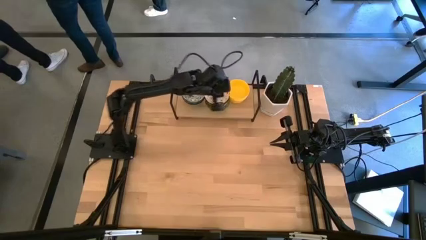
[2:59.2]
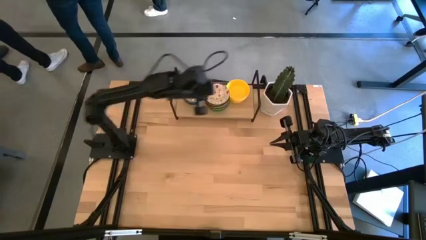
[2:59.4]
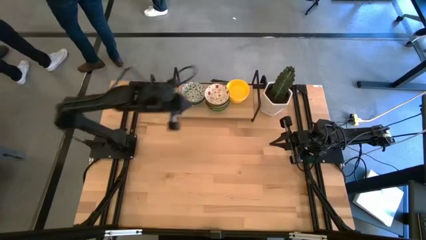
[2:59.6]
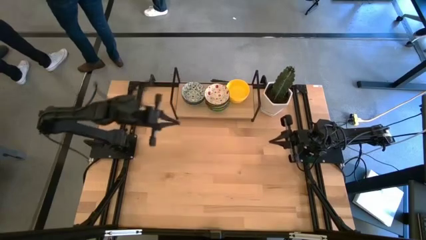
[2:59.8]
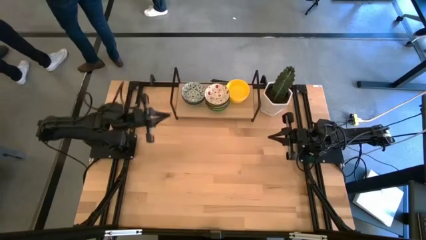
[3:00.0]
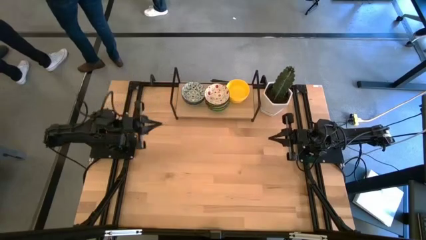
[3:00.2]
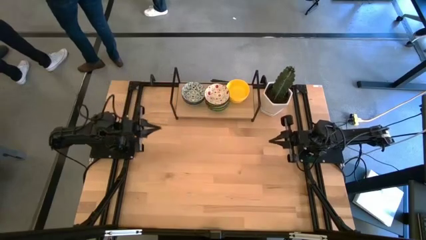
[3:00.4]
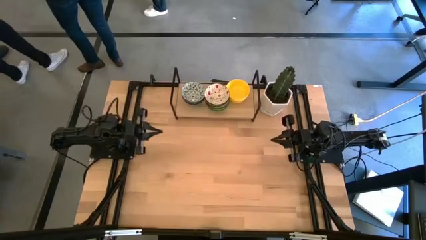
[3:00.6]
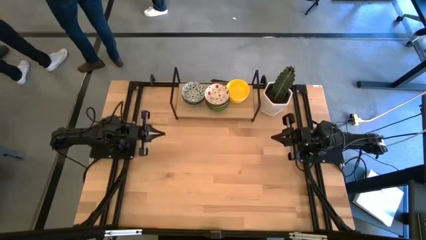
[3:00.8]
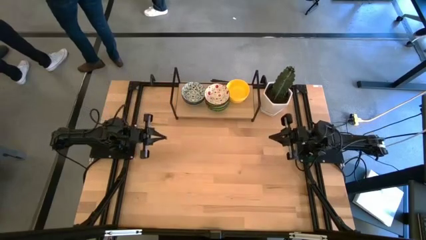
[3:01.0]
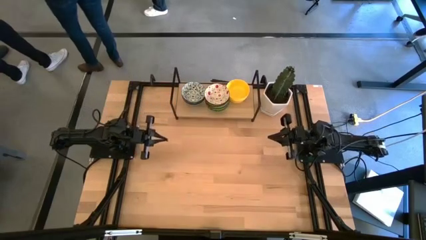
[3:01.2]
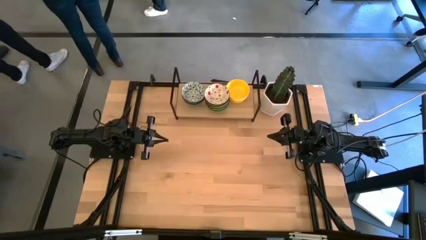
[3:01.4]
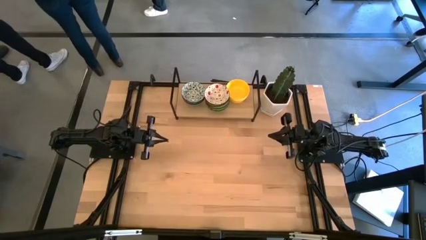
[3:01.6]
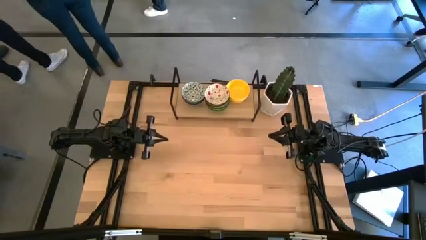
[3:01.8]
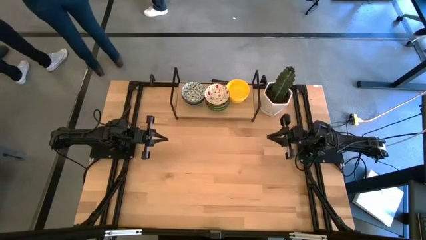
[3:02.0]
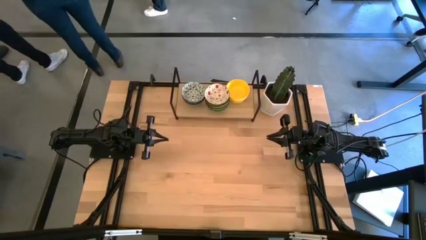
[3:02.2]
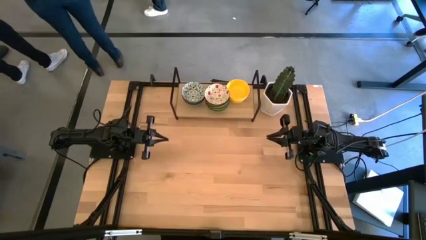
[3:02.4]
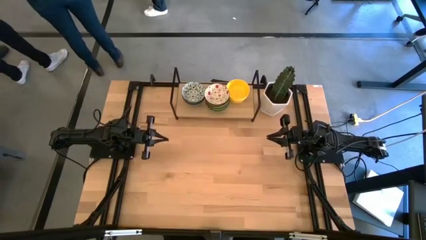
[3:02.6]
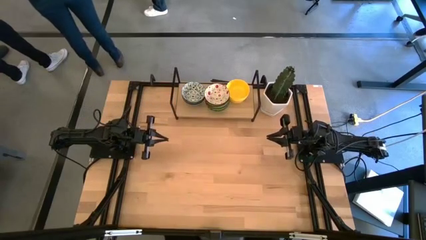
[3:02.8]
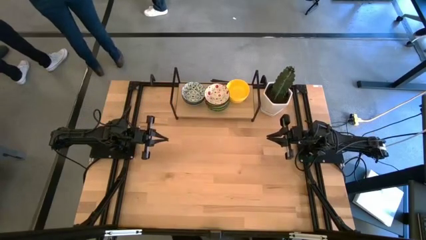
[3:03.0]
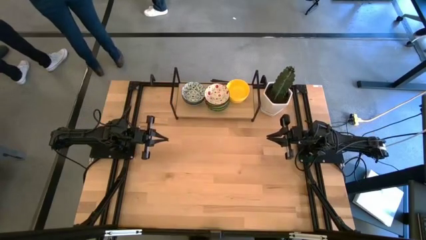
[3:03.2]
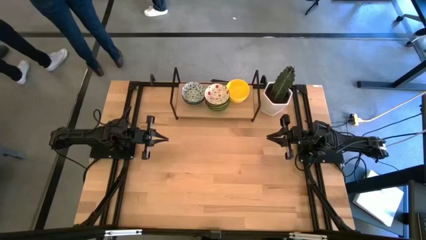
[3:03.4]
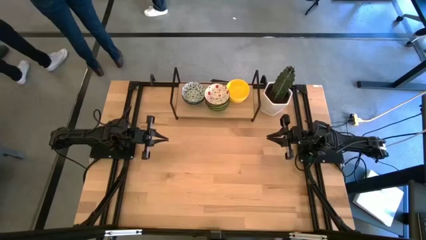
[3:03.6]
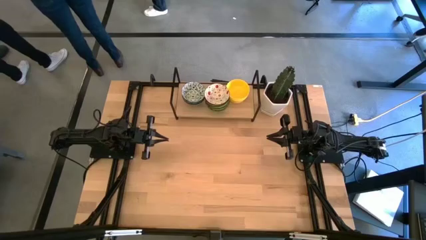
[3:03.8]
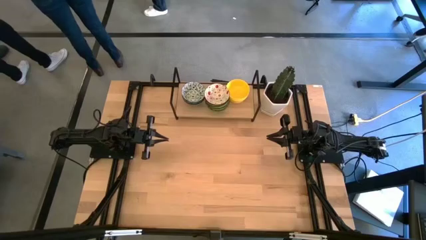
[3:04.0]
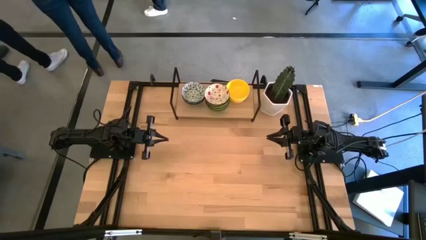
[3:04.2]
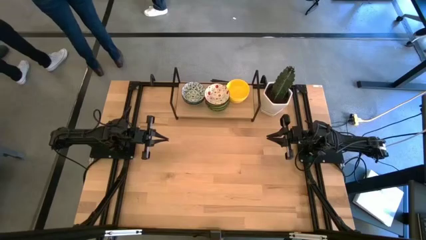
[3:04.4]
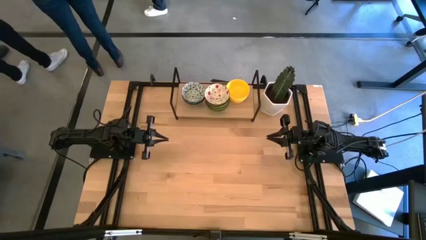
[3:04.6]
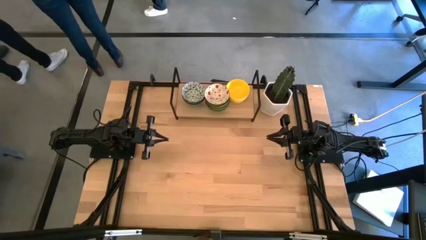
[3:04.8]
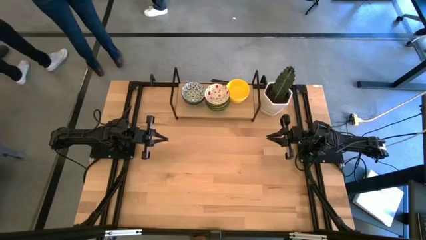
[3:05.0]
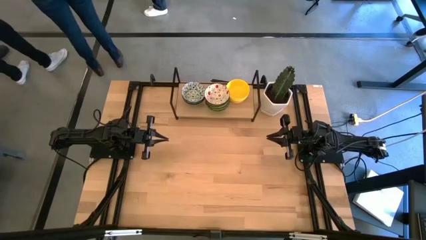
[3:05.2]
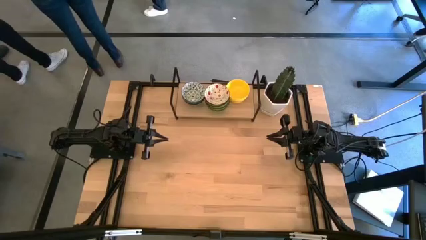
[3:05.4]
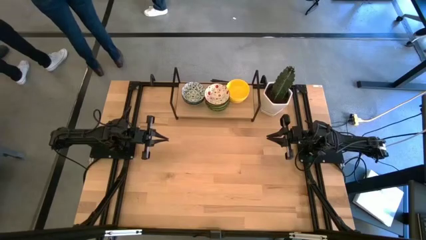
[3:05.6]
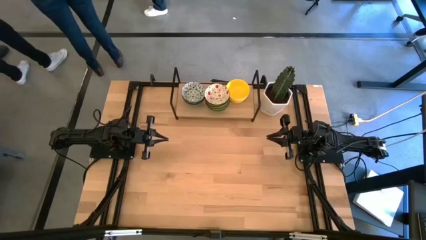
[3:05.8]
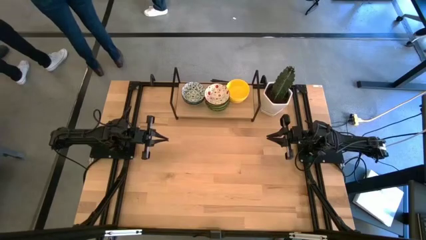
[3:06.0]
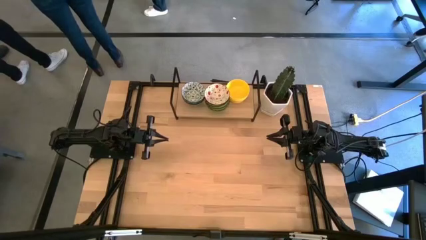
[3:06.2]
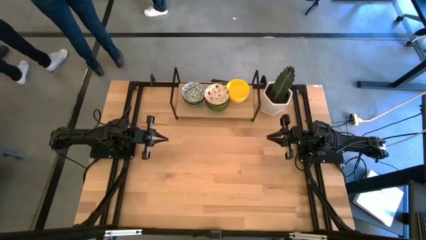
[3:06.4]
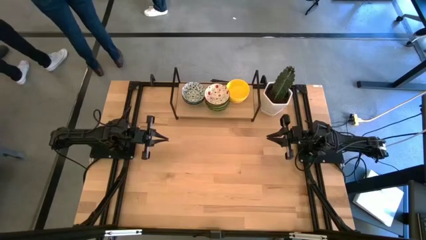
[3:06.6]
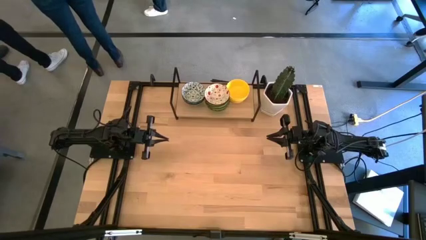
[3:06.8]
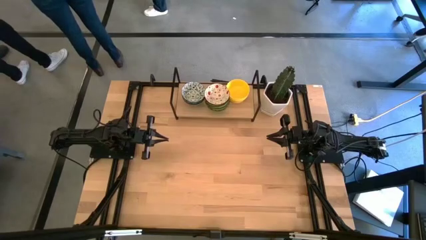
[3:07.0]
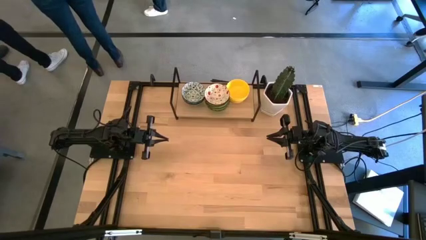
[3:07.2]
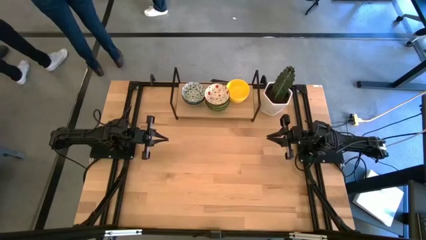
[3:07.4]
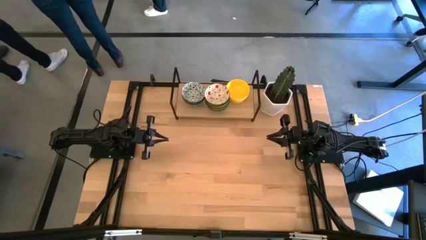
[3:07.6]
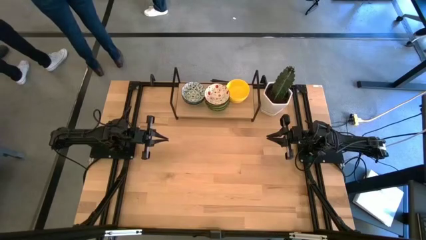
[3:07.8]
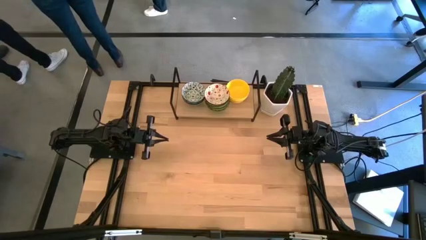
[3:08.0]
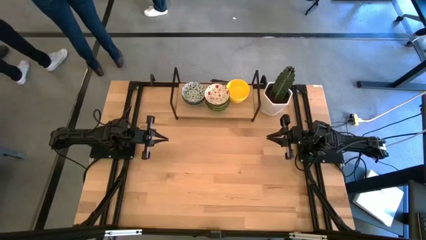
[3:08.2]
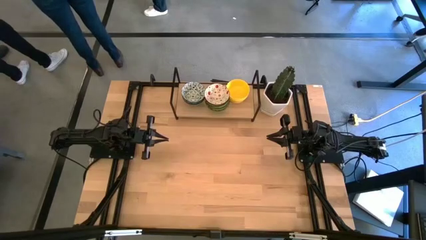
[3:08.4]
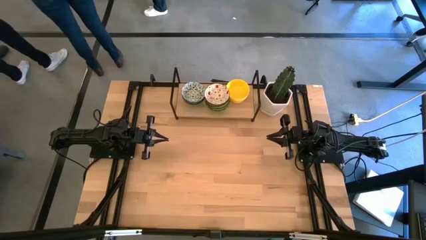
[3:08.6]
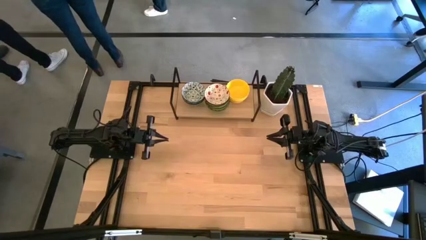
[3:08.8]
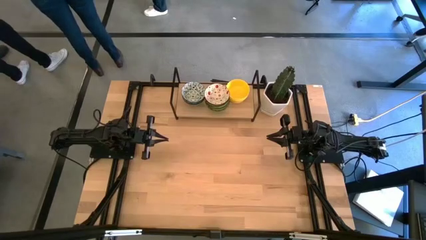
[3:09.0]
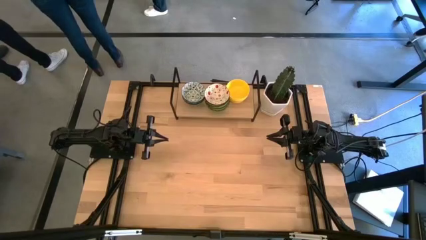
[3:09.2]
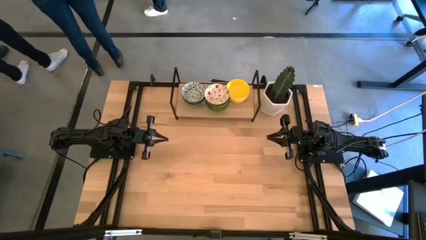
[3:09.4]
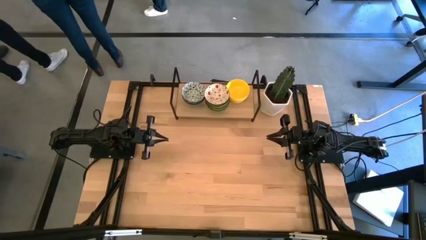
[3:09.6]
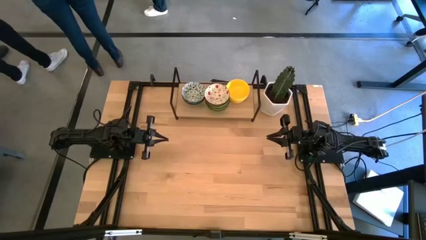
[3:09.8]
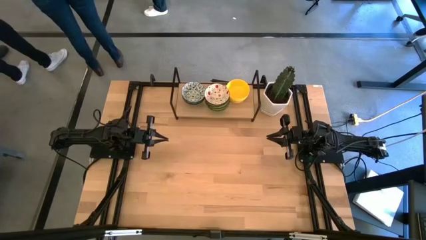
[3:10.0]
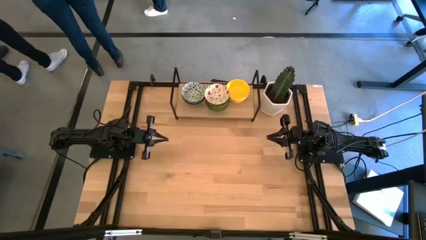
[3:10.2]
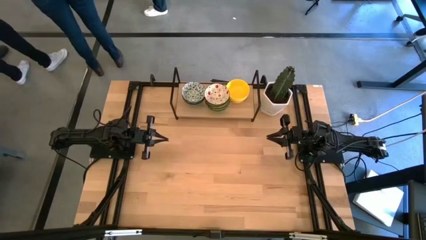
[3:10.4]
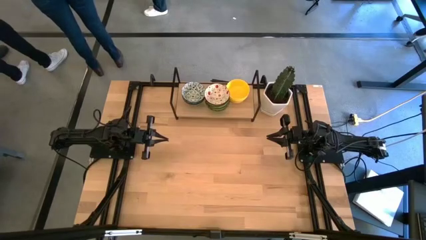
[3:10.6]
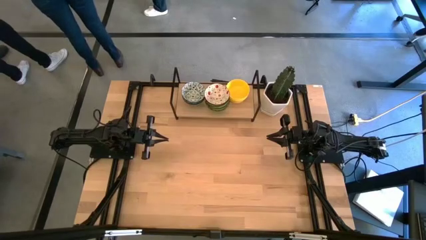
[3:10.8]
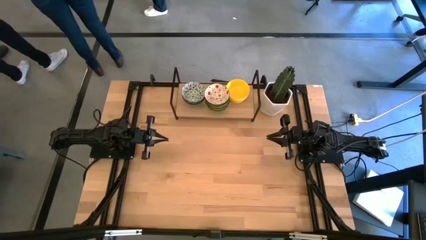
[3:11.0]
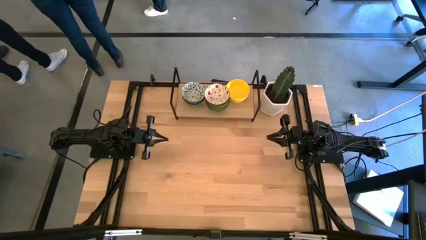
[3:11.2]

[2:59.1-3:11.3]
Task: Pick & Place Mini bowls
Return to Home Position

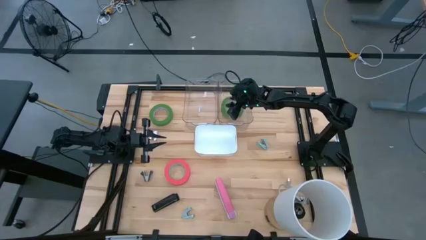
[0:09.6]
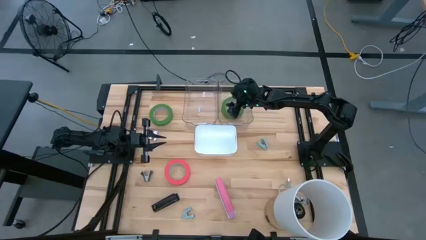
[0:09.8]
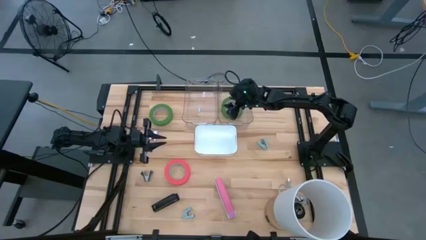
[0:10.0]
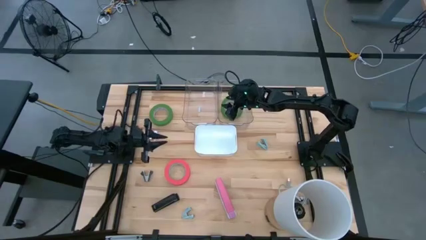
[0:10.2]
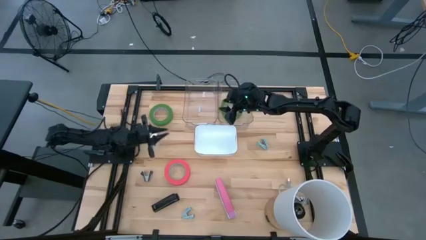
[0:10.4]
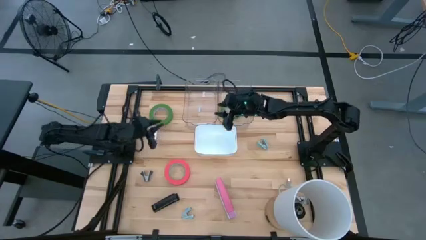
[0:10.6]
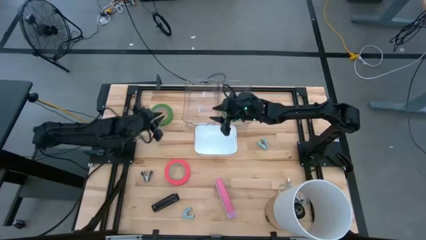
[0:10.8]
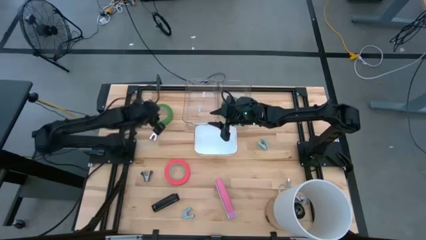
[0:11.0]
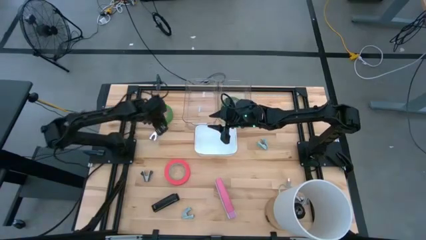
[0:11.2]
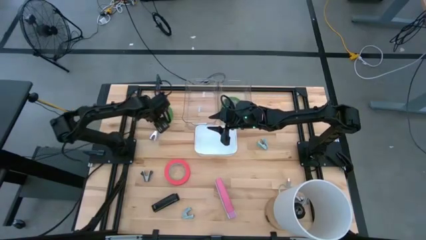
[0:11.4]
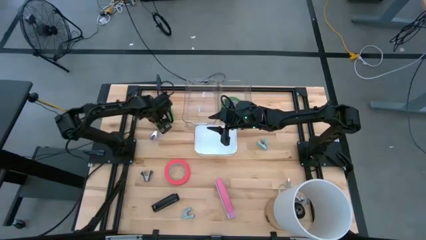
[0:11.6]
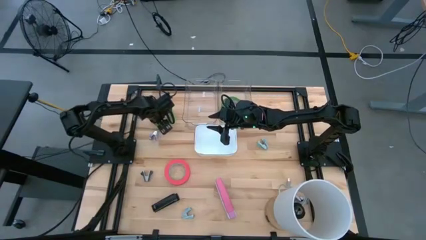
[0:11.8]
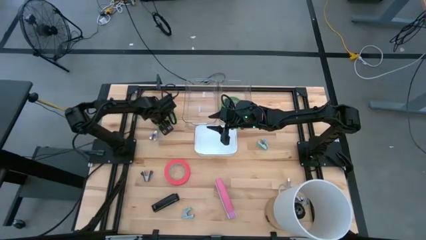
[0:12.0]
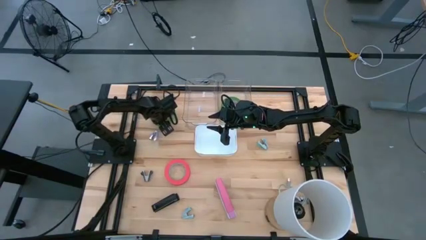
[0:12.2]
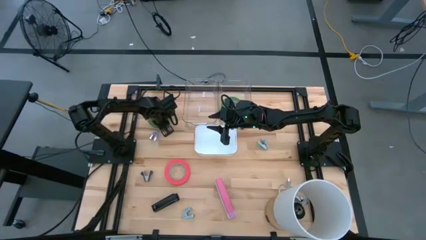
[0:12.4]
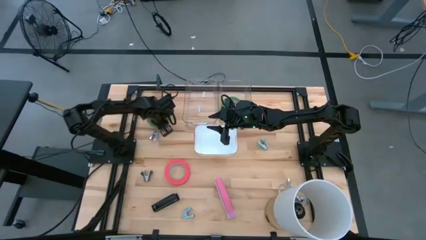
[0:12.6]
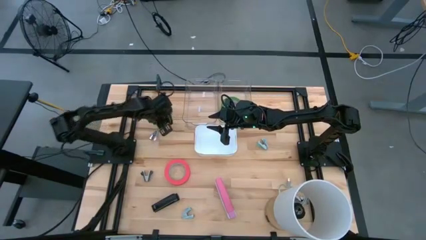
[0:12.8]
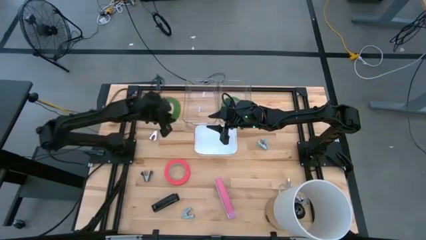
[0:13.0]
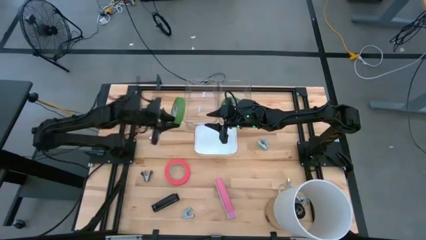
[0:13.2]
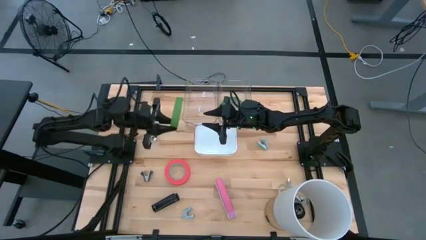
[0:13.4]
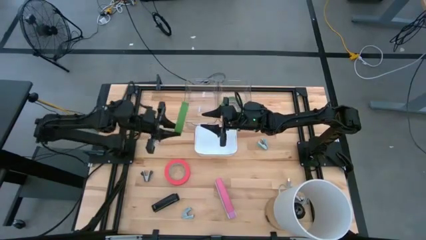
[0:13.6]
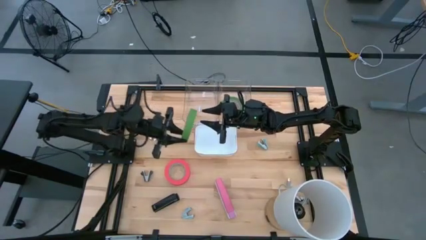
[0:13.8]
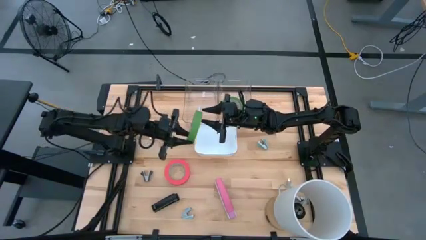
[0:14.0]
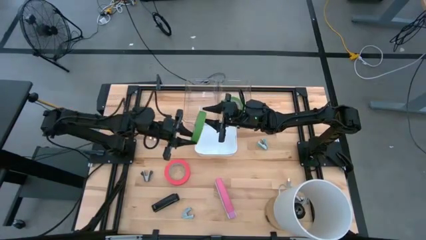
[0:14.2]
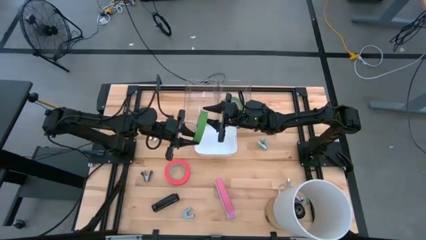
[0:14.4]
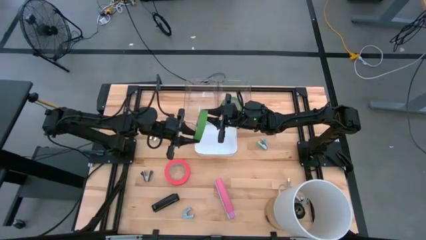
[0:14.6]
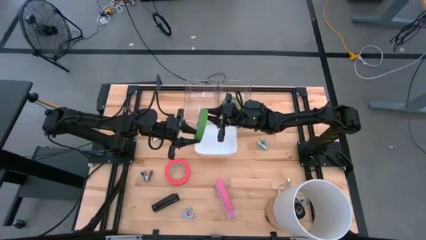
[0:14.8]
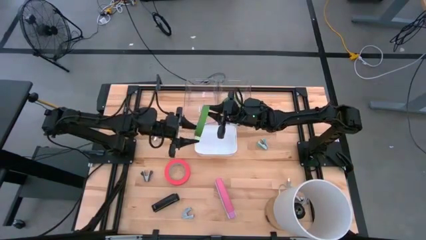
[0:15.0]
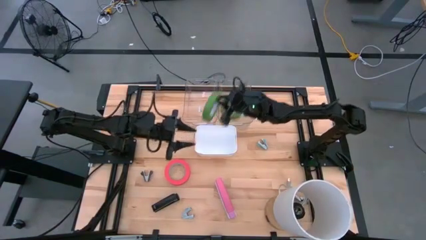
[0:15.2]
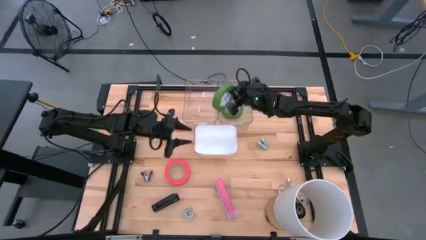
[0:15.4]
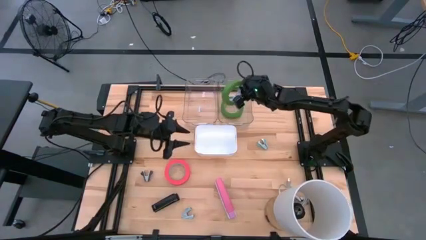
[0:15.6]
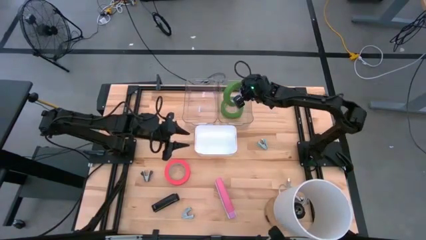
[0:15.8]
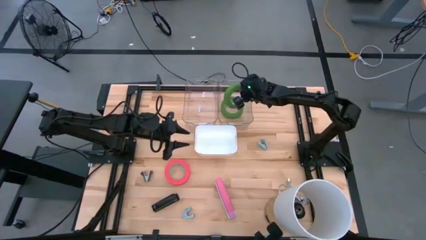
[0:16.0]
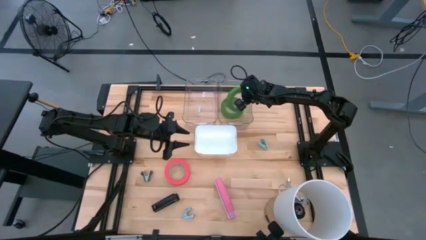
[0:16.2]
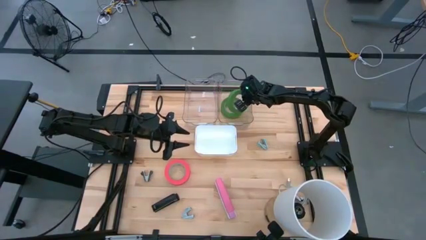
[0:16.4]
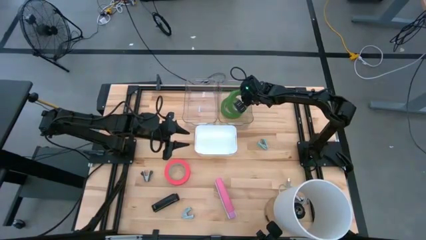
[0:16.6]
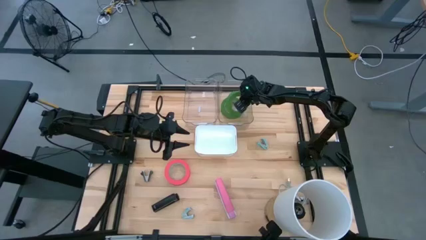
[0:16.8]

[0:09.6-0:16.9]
Task: Pick and place Stapler, Stapler remover, tape
Put the green tape into the right transparent bin
